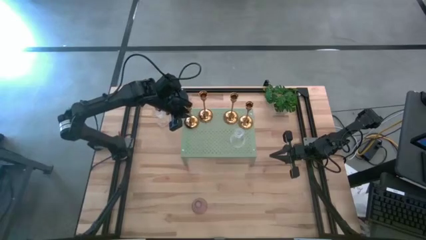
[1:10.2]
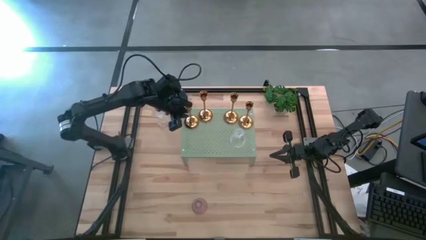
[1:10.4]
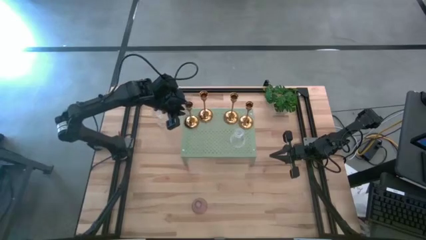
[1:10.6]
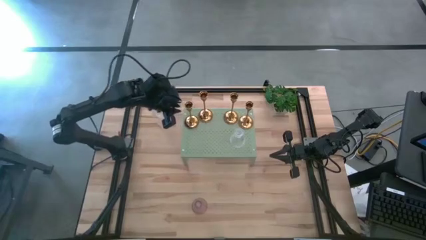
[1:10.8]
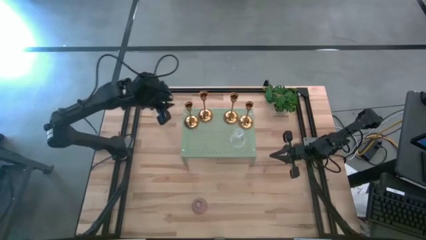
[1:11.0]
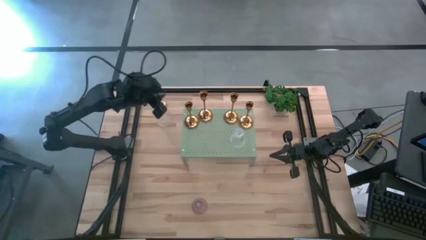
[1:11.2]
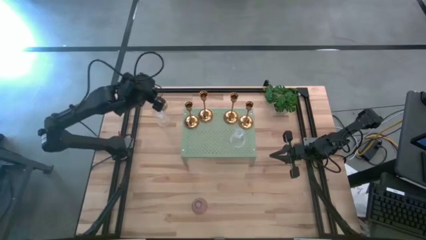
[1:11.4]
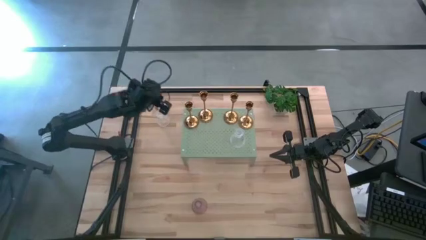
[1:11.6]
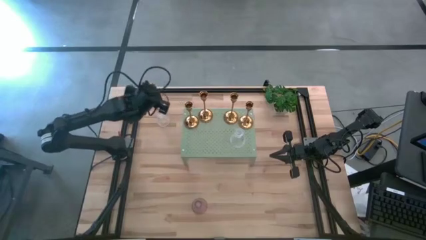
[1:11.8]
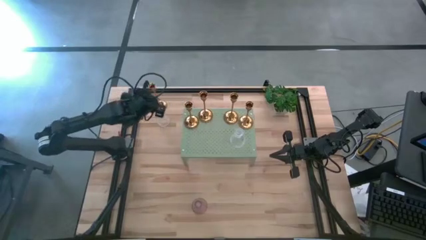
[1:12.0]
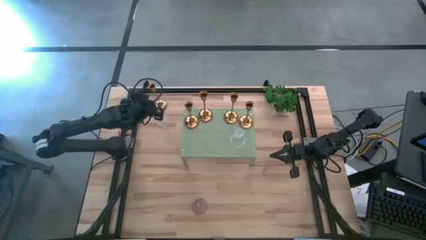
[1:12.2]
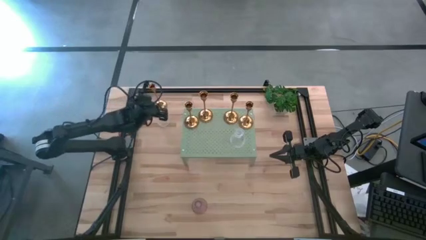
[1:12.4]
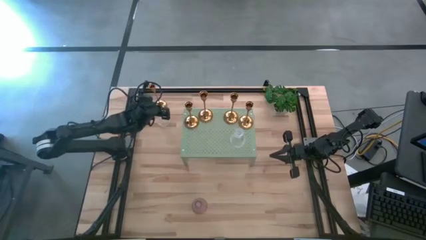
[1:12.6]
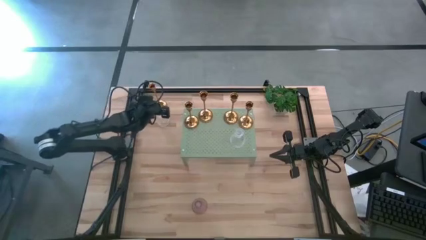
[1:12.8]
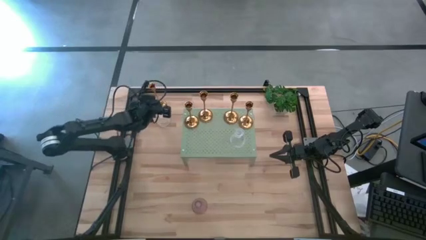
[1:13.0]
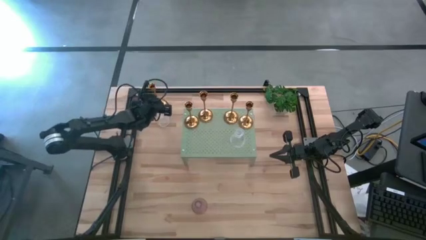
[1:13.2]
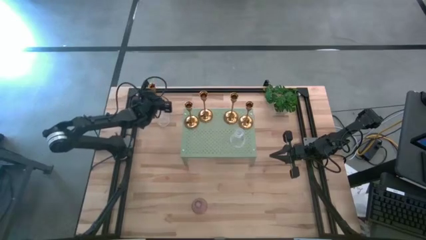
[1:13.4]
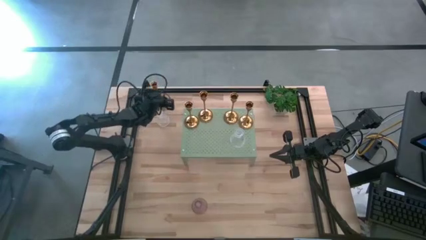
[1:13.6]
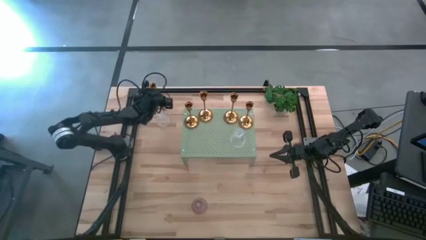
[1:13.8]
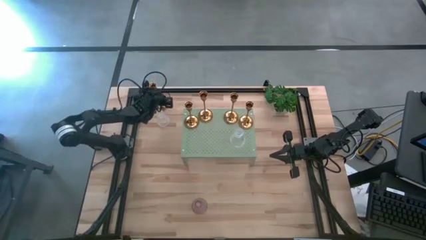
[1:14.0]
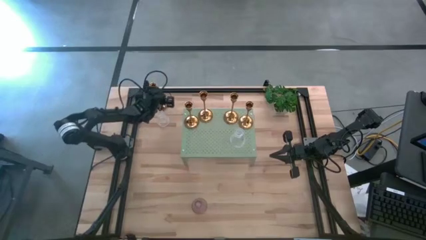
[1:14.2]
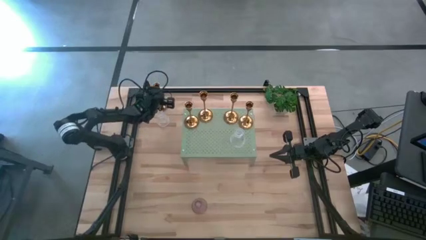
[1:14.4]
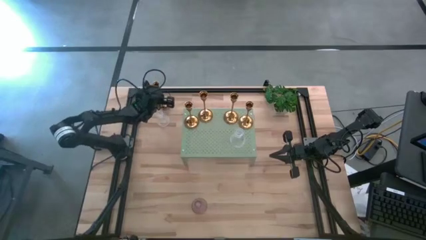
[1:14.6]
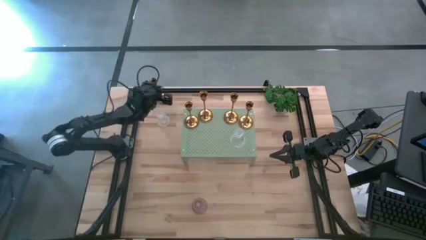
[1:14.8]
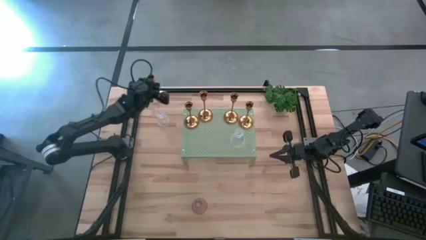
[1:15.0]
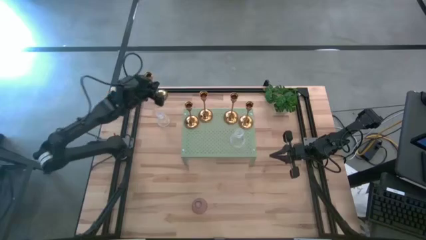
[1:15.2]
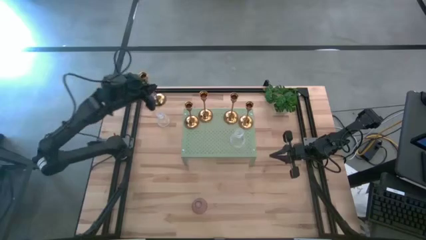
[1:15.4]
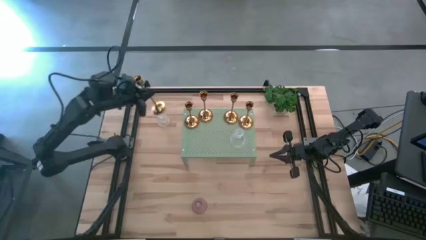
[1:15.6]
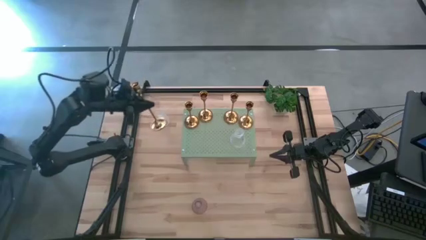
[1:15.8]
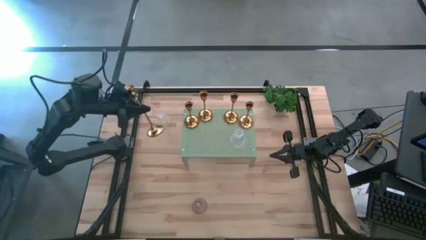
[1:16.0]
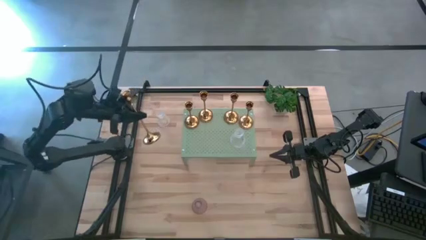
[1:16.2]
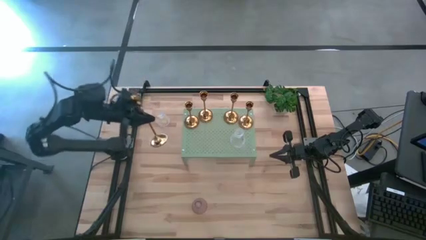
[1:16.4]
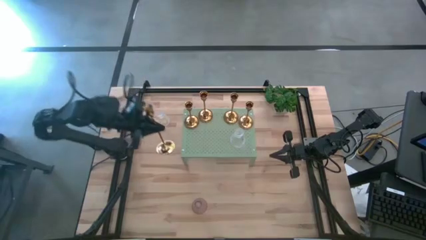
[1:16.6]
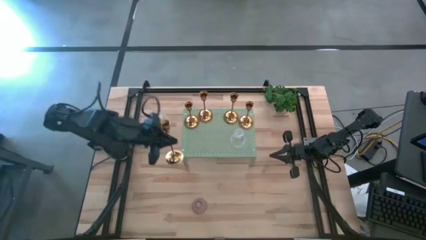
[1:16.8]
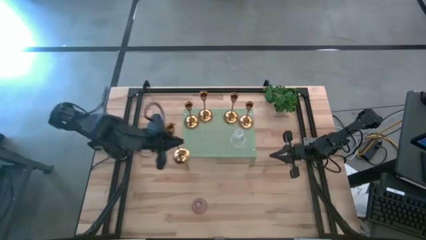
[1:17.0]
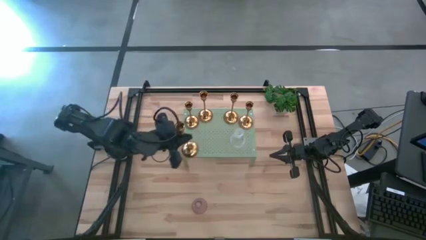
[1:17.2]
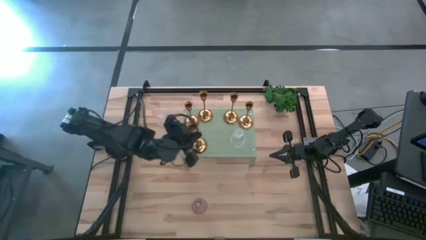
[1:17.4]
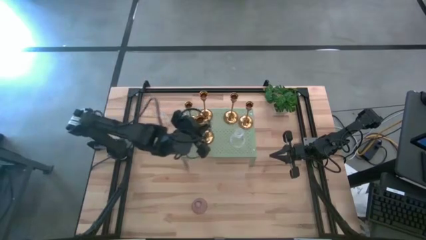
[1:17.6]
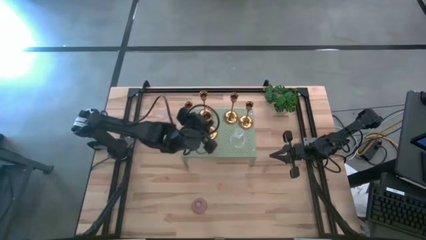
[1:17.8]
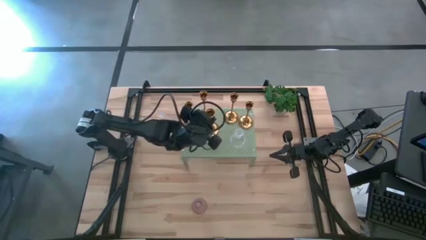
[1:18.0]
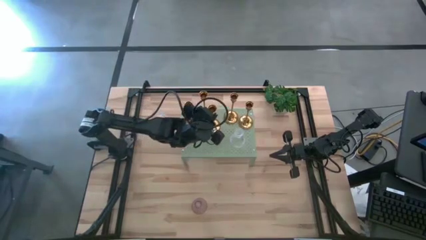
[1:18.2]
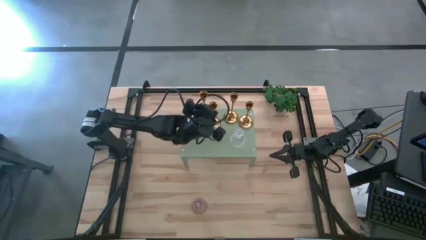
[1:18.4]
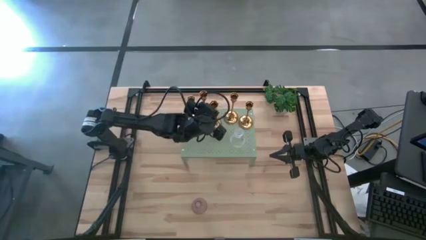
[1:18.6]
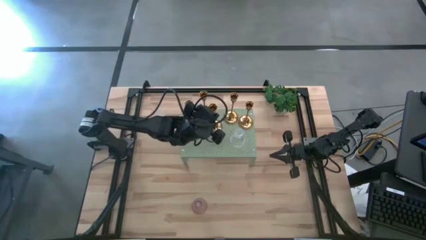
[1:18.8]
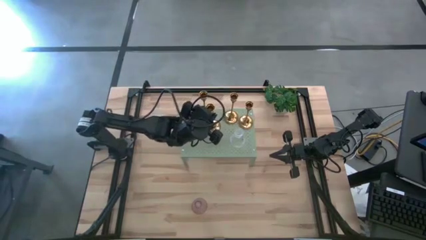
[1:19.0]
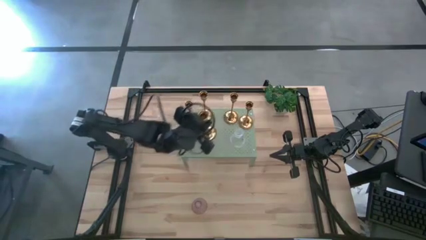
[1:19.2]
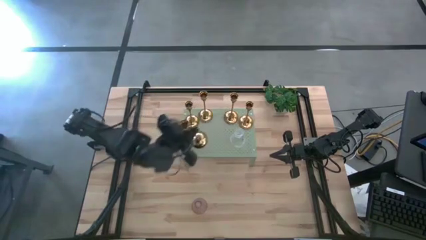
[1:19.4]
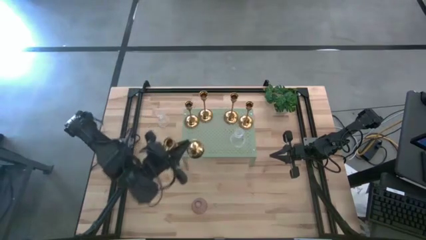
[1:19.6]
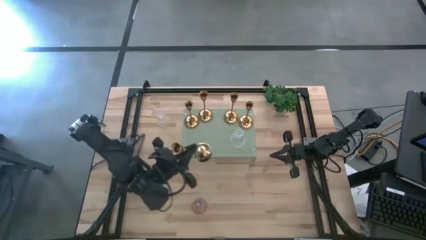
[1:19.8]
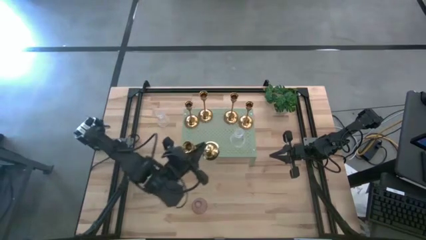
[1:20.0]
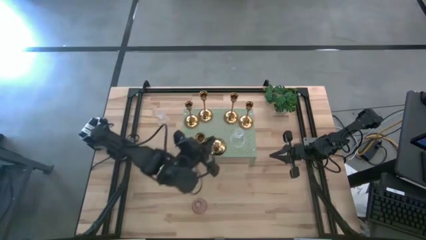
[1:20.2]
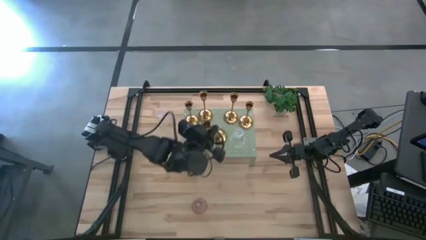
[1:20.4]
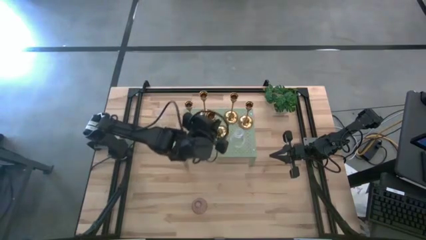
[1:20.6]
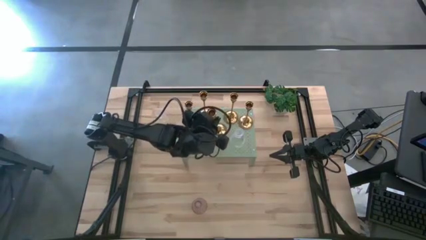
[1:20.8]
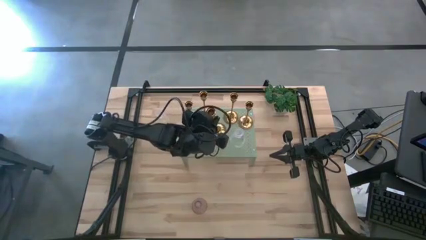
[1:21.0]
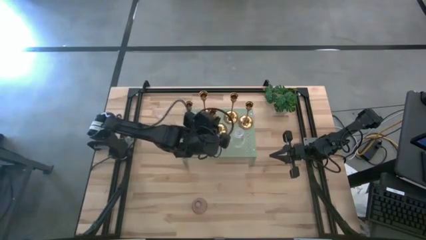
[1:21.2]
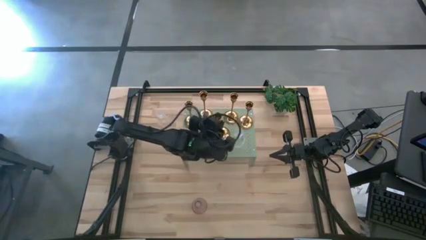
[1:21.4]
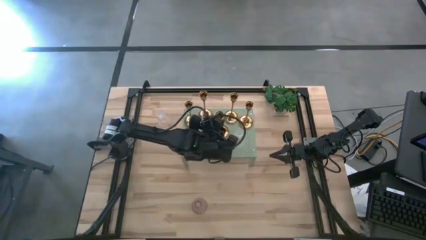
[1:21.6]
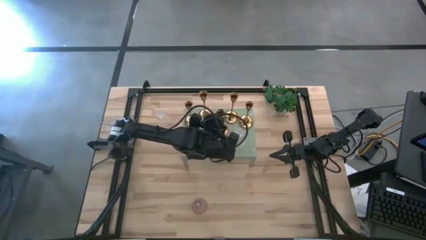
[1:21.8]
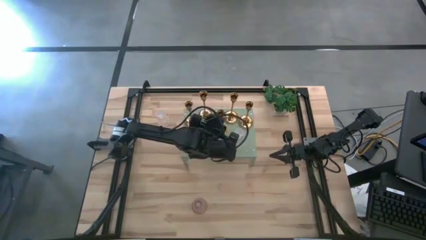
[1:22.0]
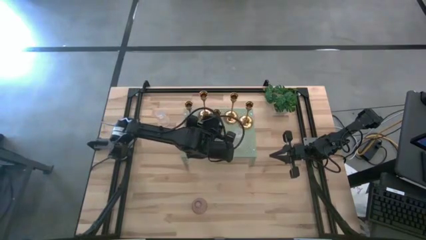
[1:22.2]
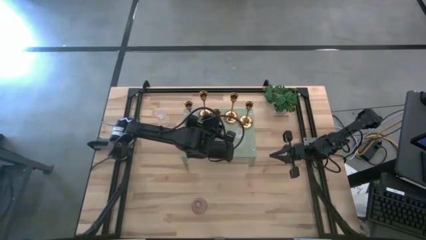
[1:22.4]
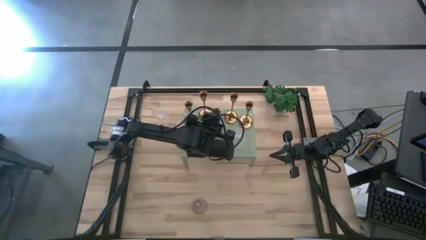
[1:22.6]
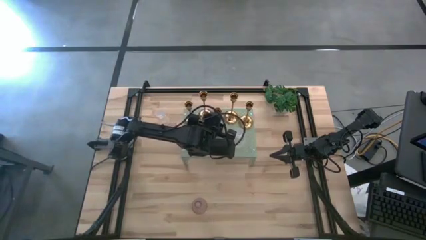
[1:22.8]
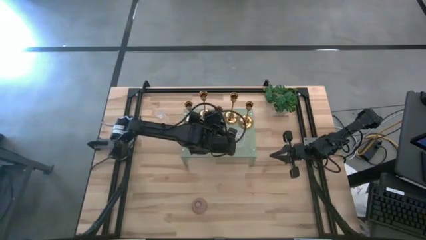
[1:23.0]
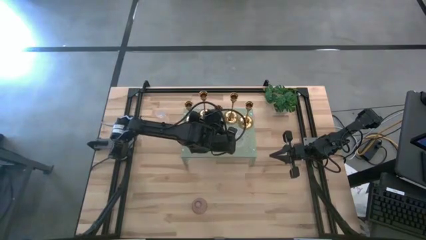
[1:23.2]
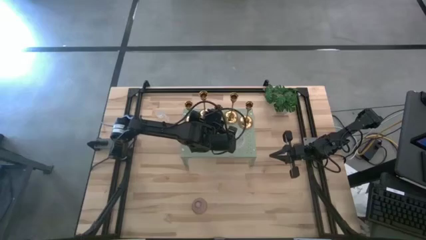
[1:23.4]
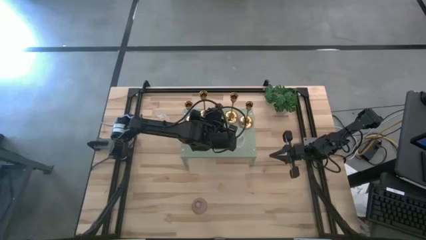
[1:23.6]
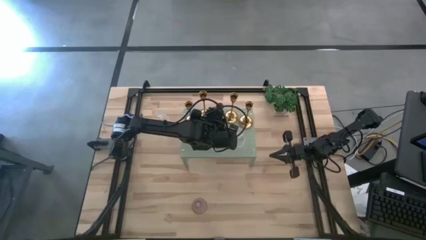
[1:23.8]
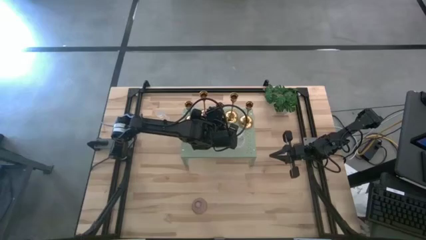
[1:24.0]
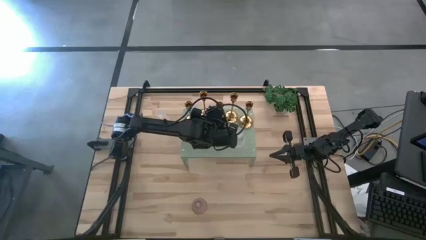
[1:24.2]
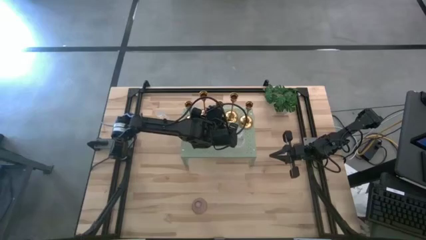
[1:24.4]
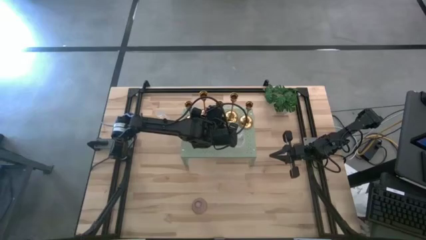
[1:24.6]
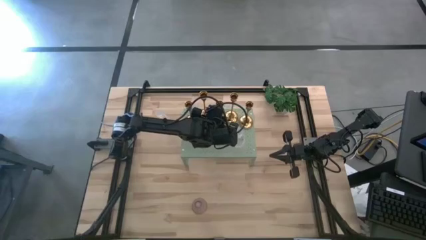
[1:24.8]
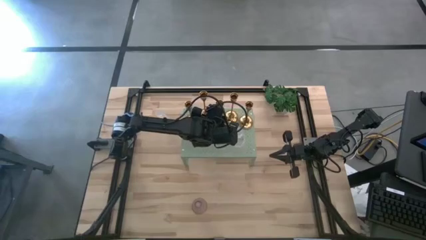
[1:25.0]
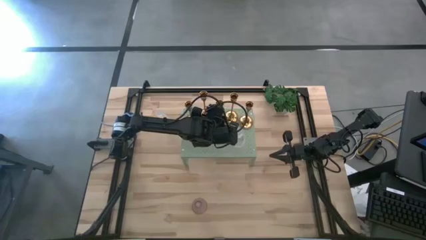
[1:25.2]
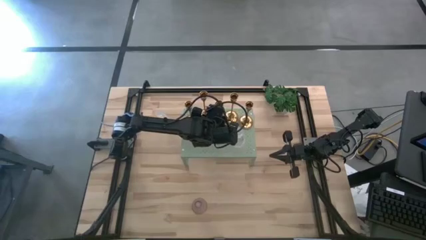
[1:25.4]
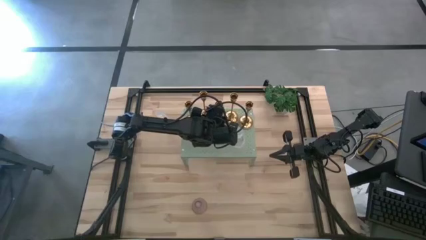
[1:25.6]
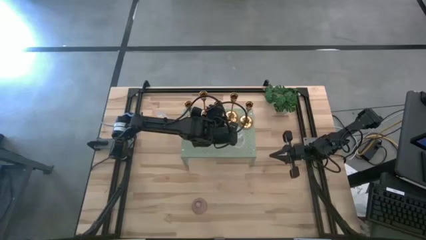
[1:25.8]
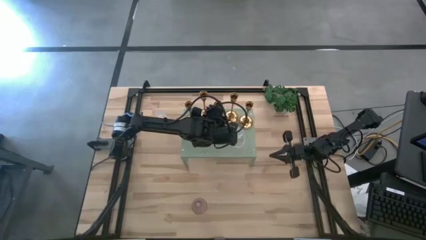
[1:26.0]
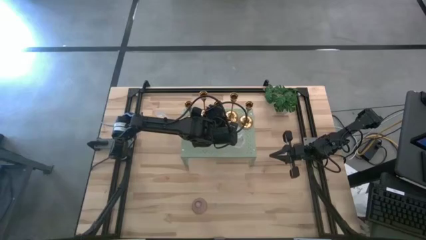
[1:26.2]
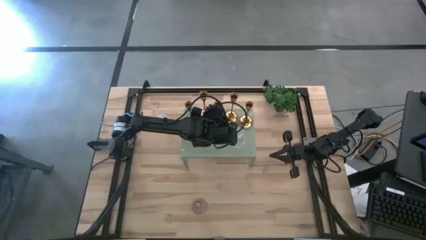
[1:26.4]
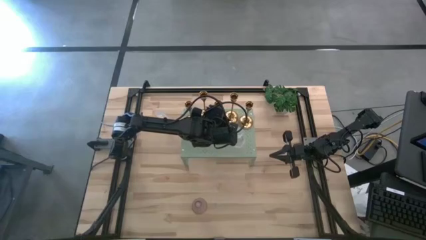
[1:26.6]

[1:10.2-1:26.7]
Task: Pick & Place candle stick holders
Put the gold candle stand on the shelf
